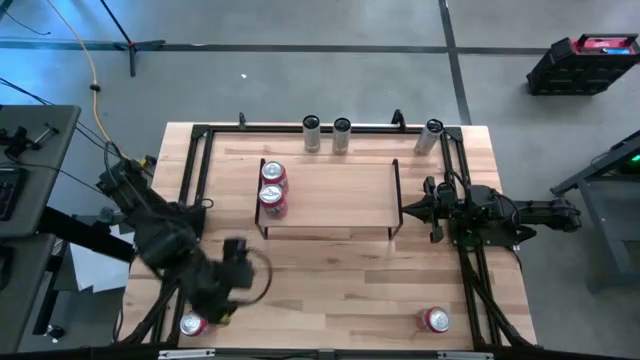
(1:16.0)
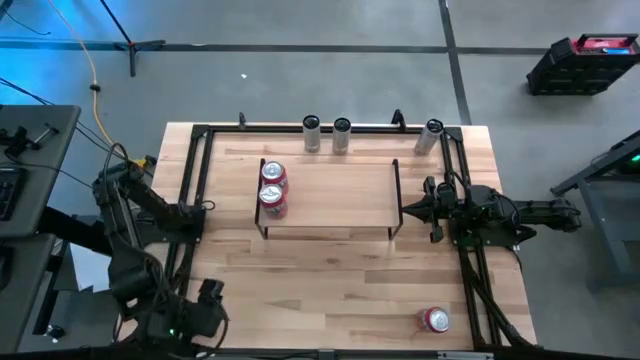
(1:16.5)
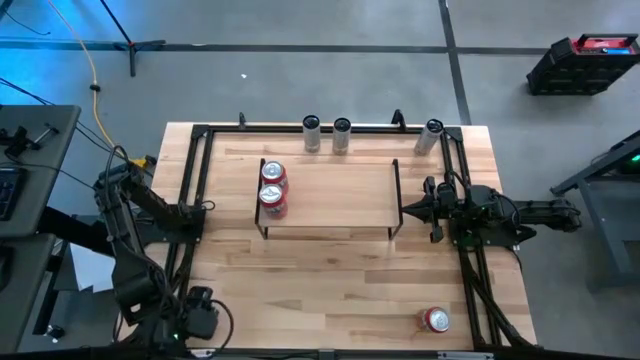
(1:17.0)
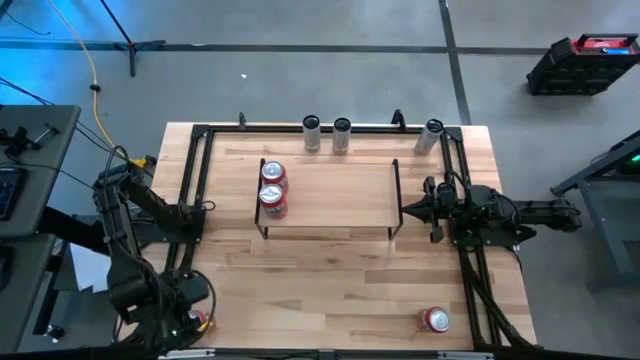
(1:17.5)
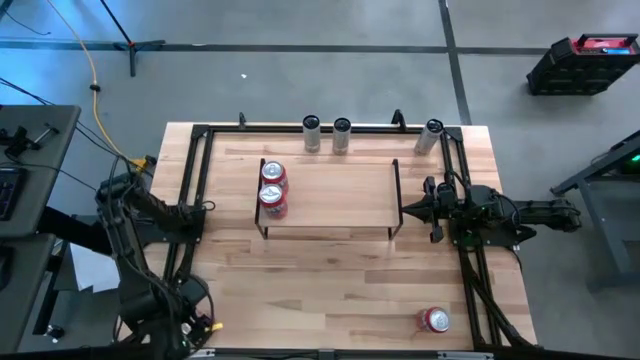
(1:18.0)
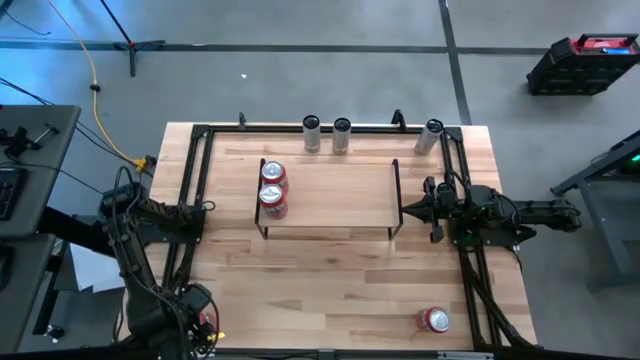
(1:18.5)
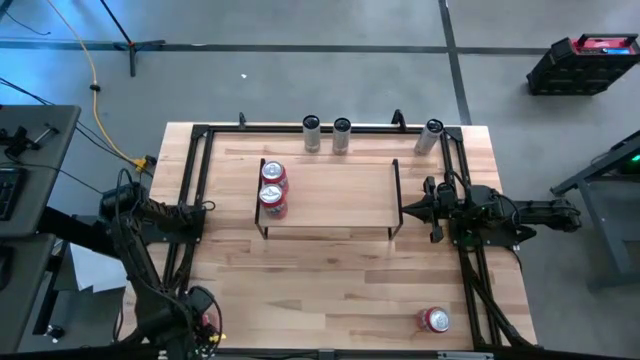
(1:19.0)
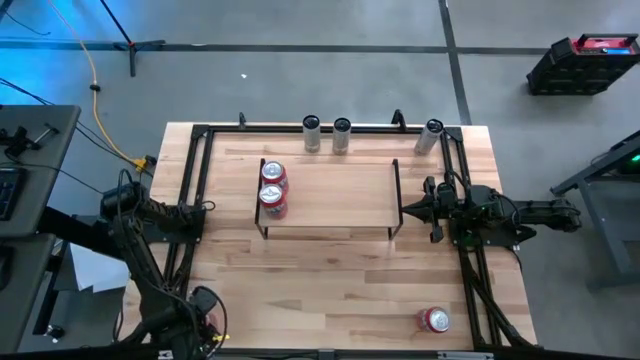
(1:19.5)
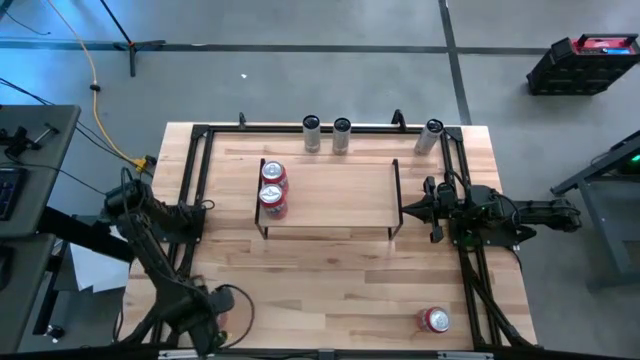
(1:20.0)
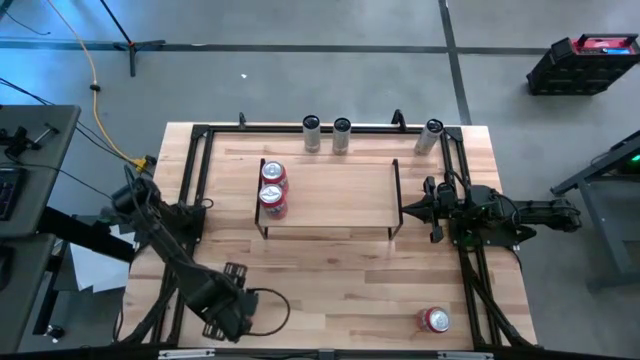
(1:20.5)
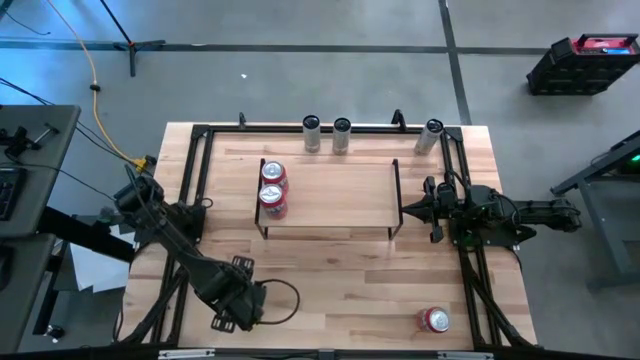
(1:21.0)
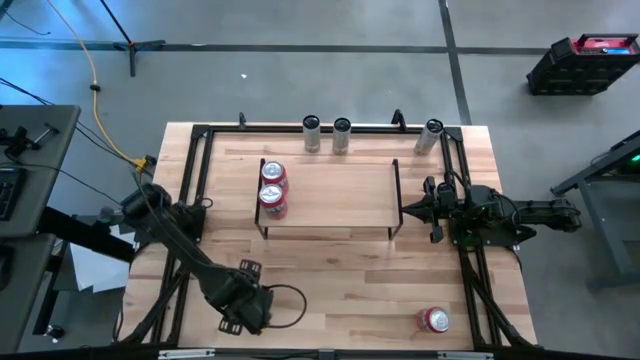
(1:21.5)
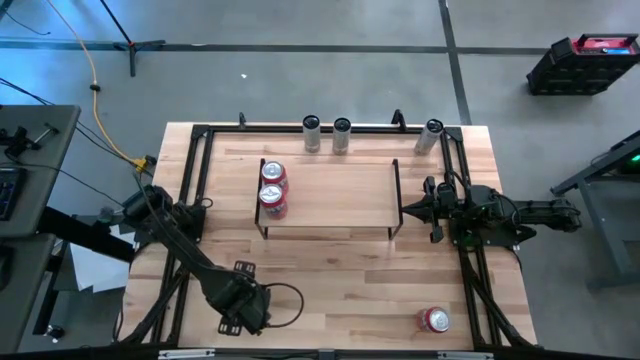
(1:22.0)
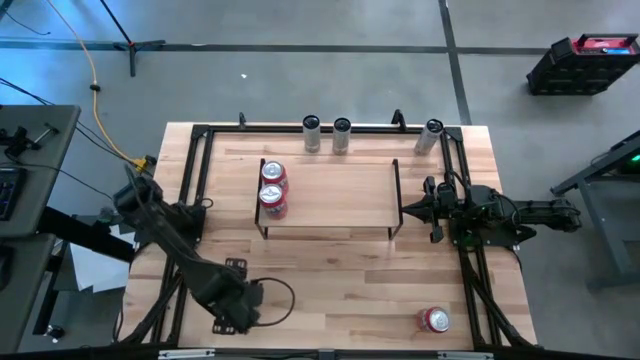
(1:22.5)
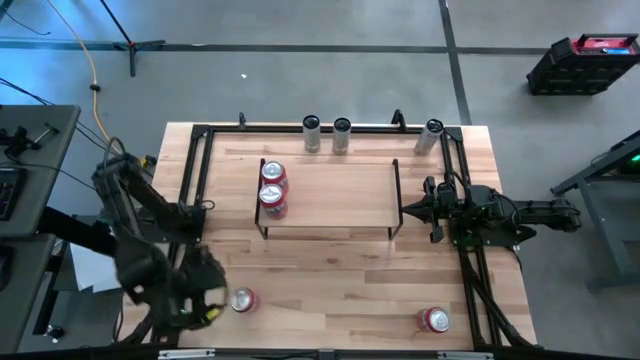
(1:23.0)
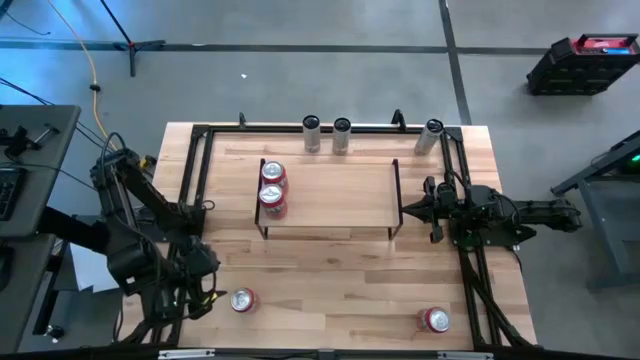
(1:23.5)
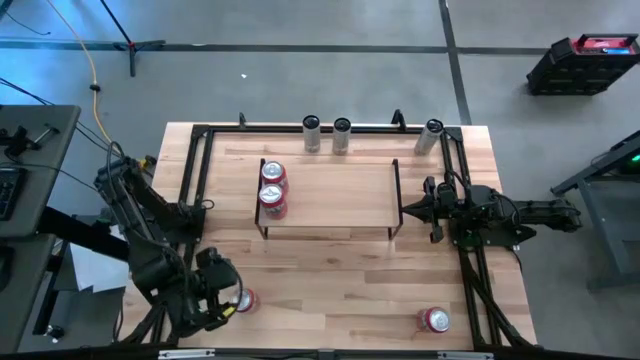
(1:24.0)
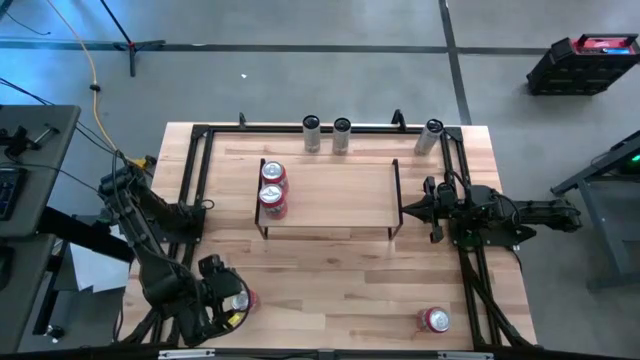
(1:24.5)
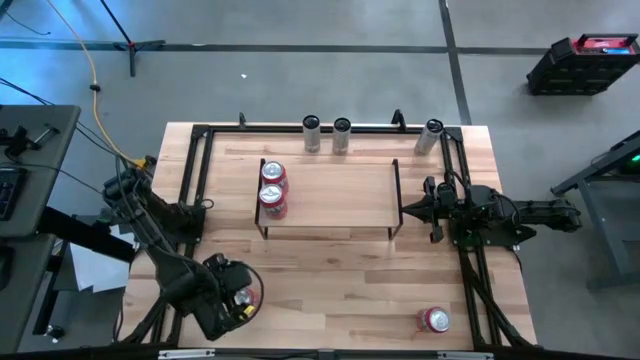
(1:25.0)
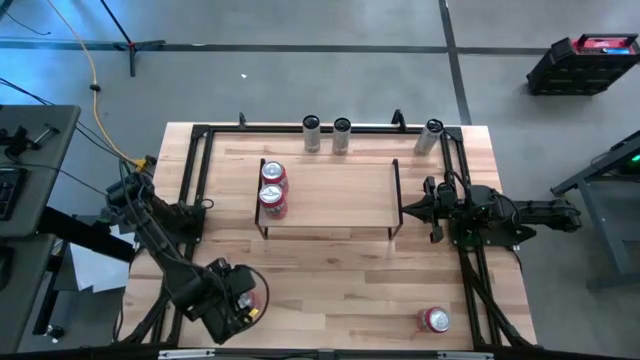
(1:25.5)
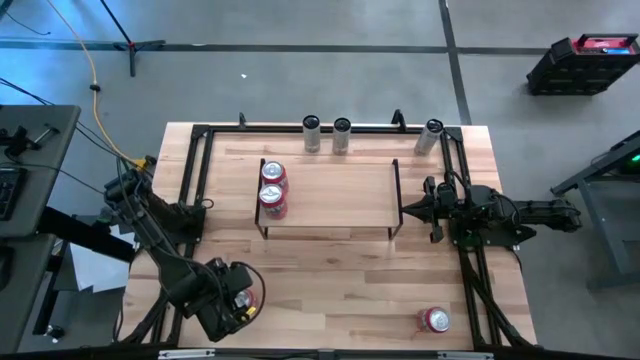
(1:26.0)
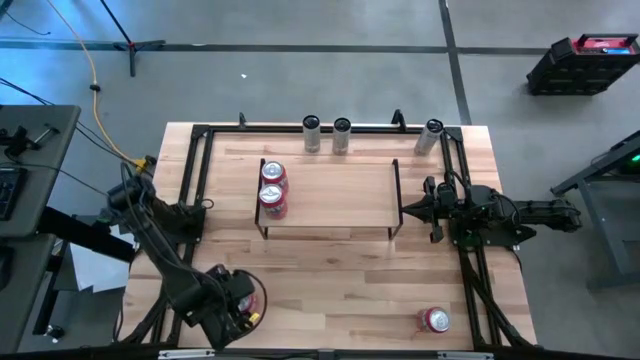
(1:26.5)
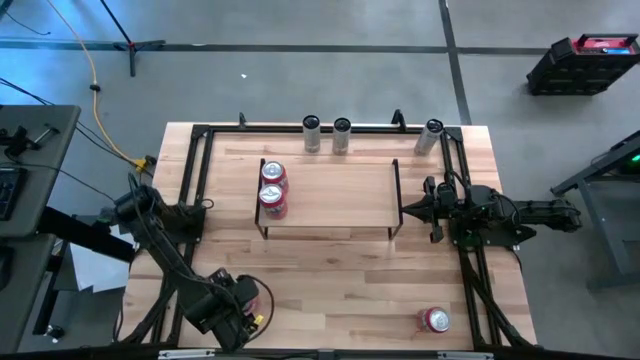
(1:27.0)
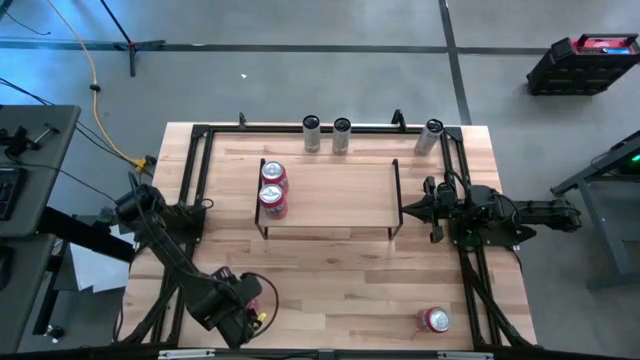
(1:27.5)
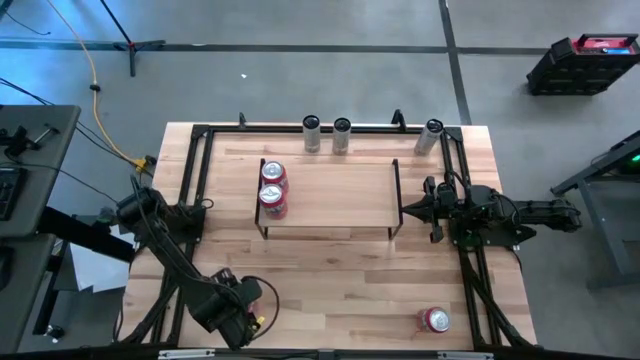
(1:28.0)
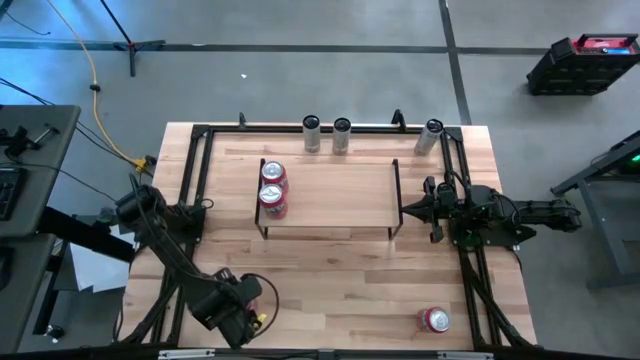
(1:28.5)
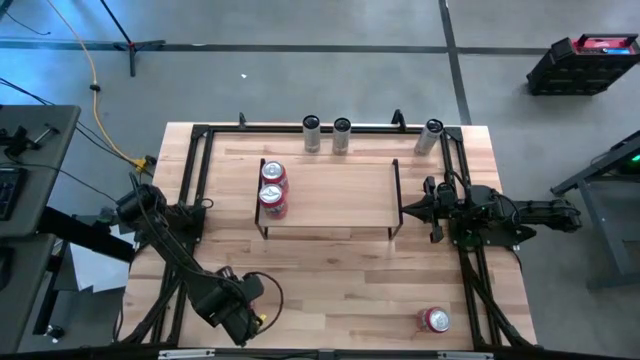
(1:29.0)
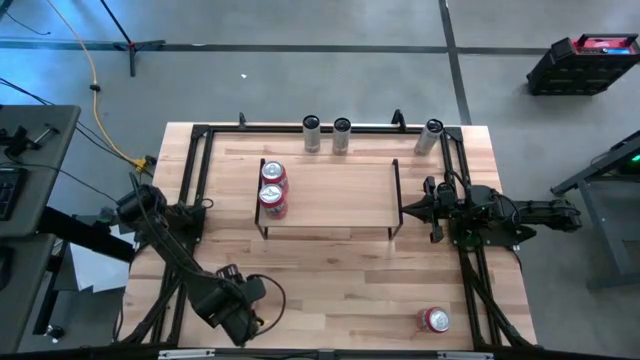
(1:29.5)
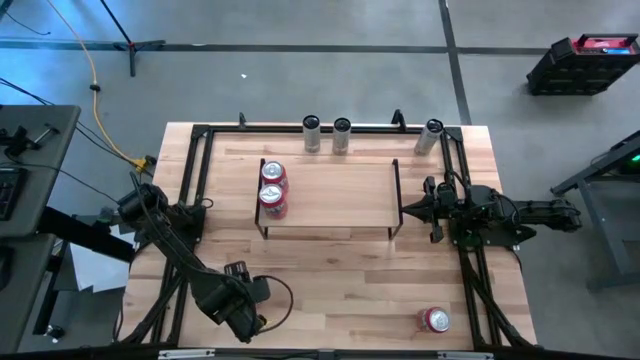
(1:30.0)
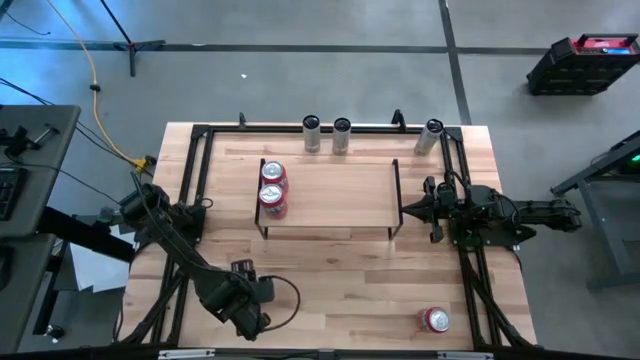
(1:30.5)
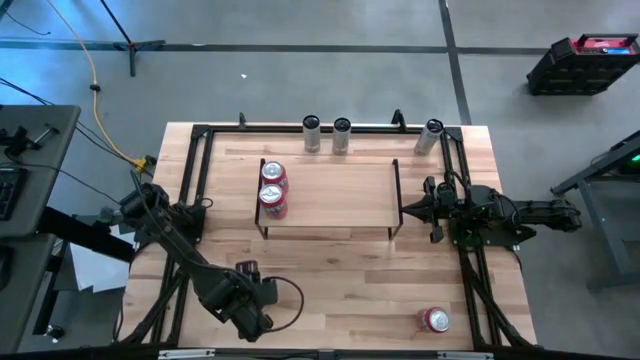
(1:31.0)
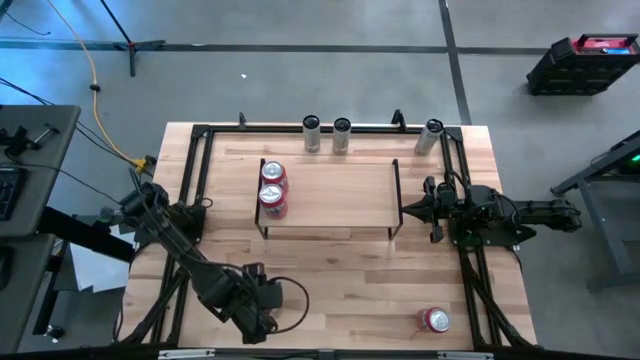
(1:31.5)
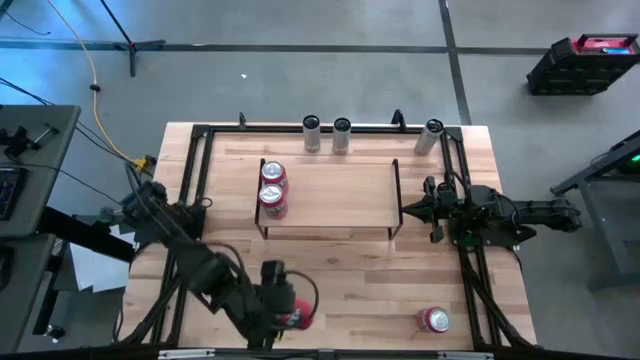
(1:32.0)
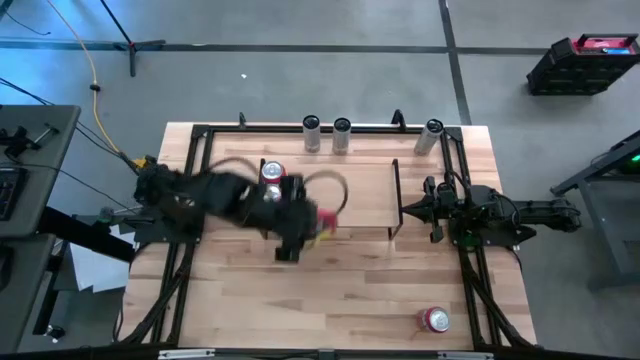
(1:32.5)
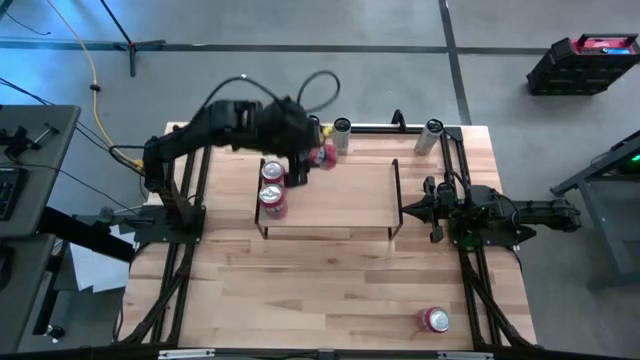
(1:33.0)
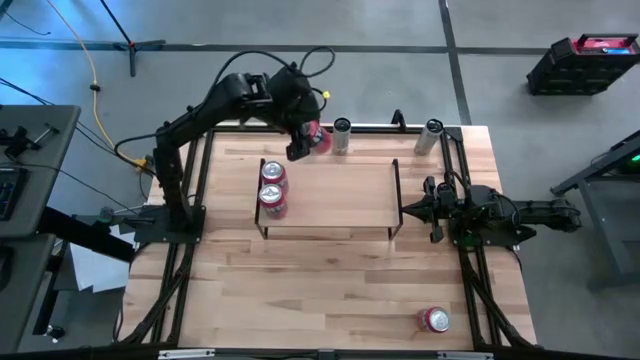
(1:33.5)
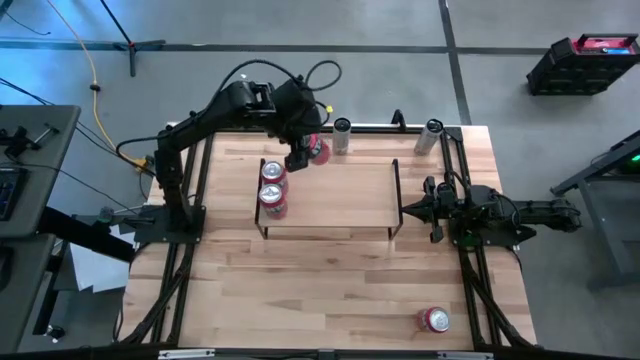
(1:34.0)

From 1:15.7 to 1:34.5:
Task: Place canned beverage on shelf
Put the red soda can on the shelf

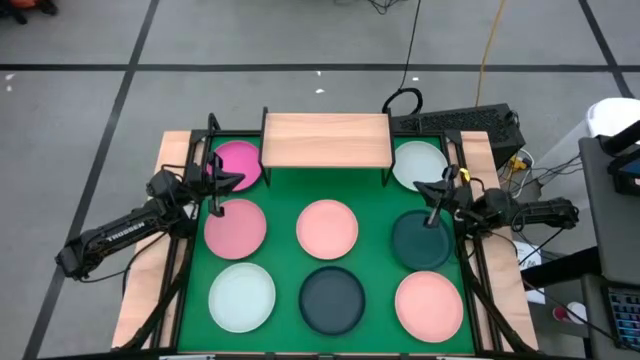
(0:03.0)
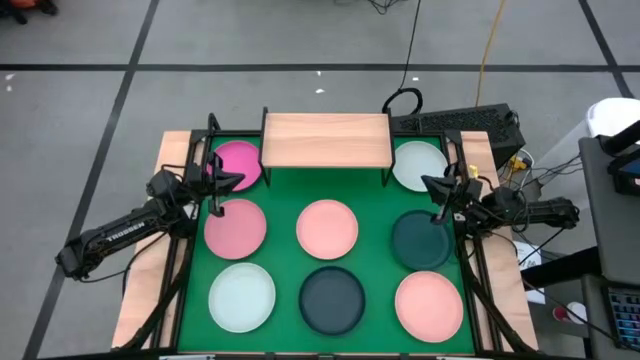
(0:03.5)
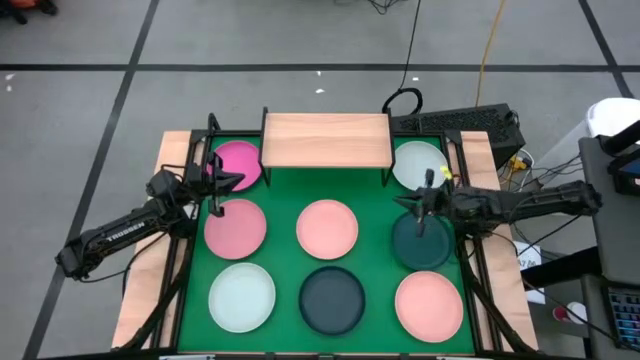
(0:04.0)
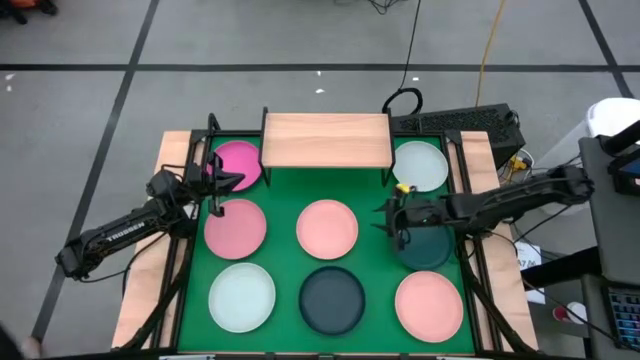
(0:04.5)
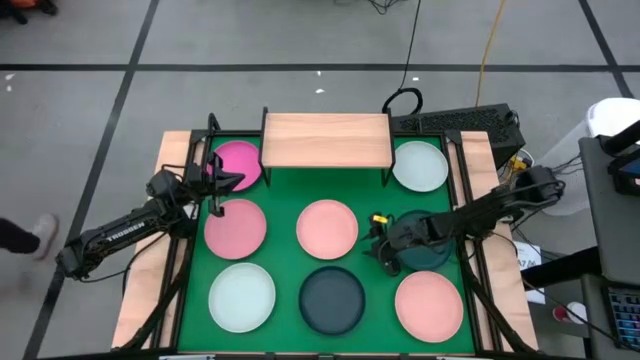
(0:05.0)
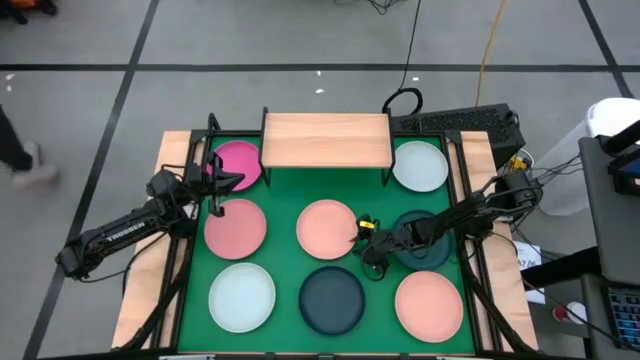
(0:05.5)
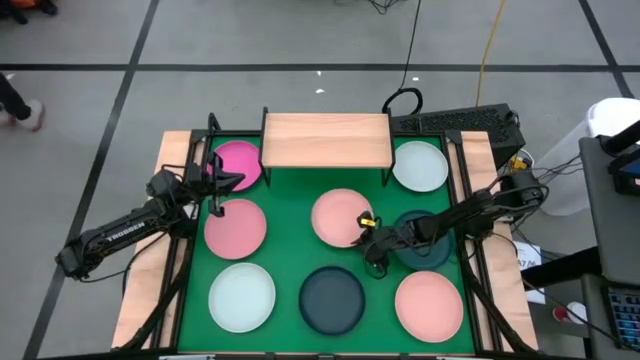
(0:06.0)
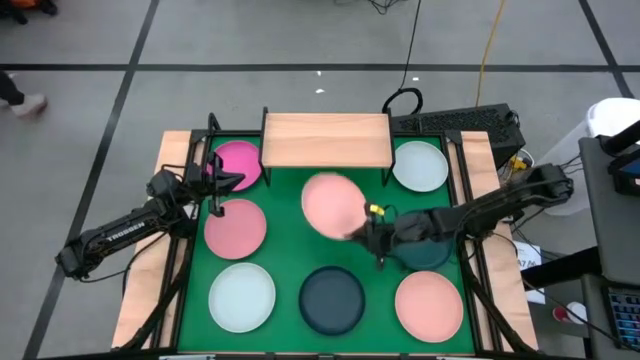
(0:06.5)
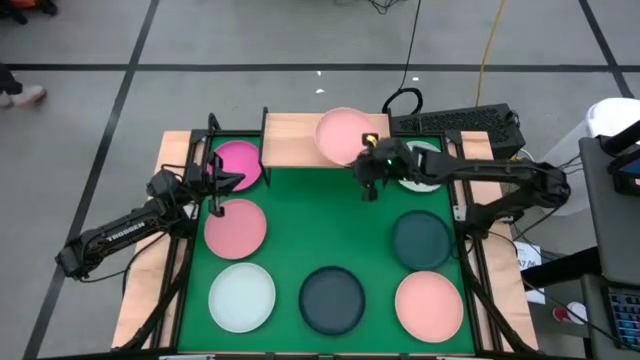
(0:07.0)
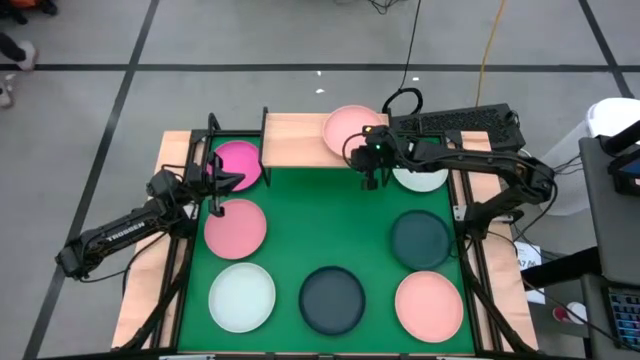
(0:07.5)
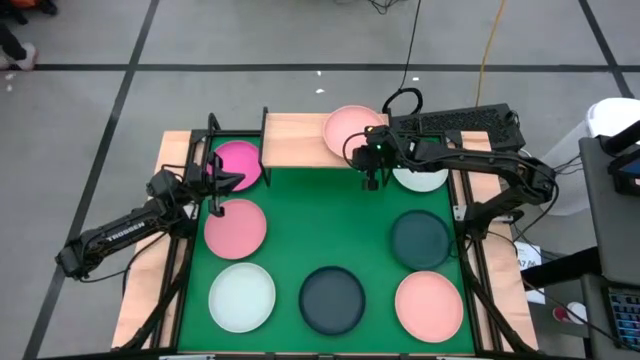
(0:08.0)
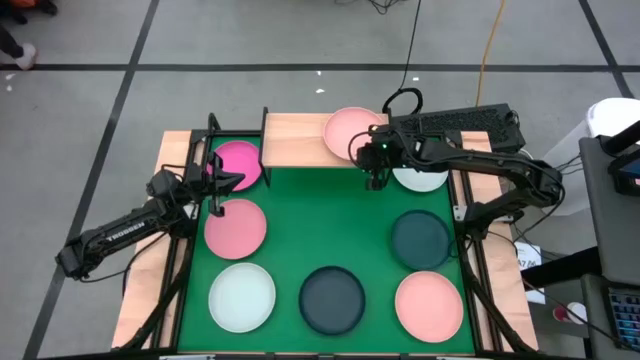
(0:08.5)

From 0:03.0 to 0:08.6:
Task: Place and stack plates onto a shelf
Put the light orange plate on the shelf
